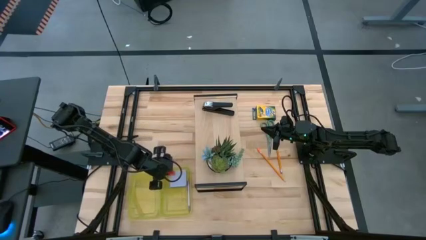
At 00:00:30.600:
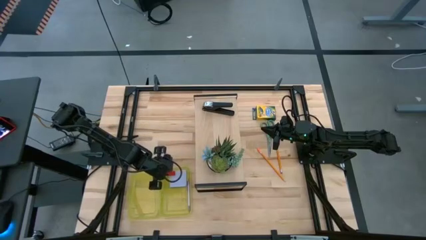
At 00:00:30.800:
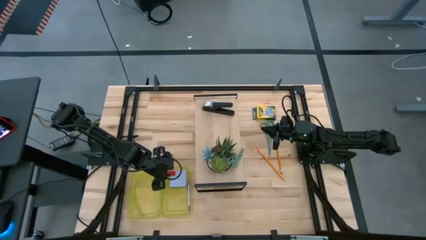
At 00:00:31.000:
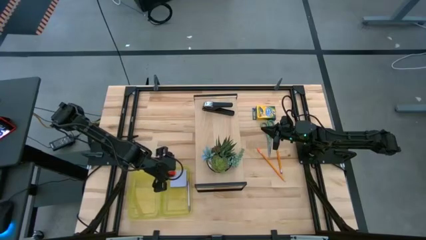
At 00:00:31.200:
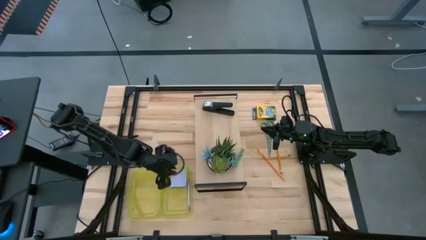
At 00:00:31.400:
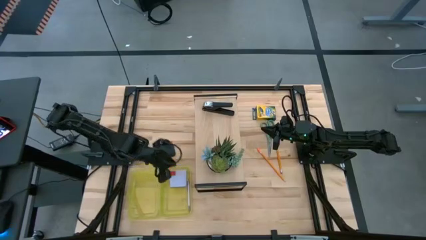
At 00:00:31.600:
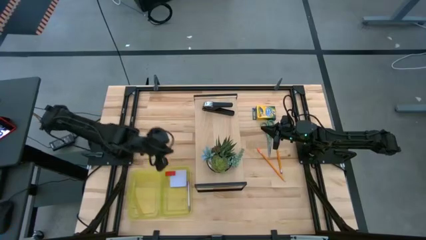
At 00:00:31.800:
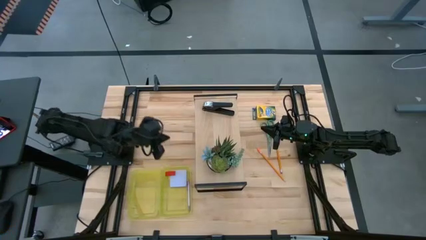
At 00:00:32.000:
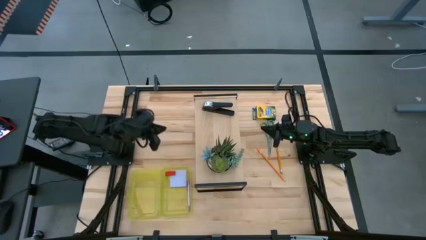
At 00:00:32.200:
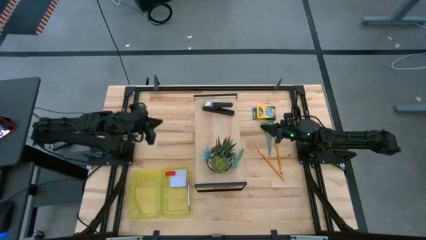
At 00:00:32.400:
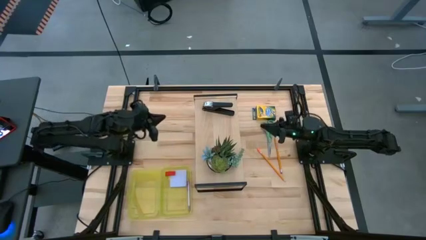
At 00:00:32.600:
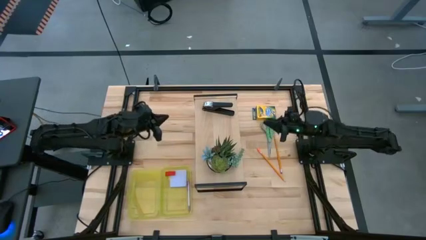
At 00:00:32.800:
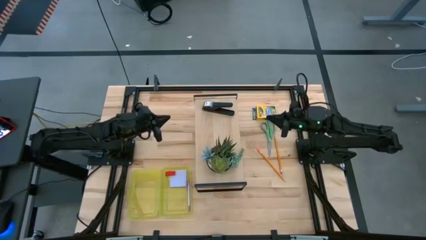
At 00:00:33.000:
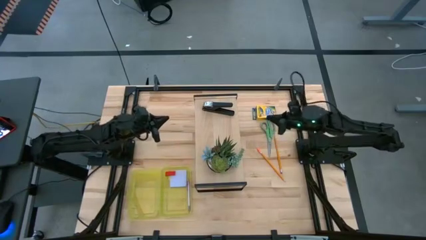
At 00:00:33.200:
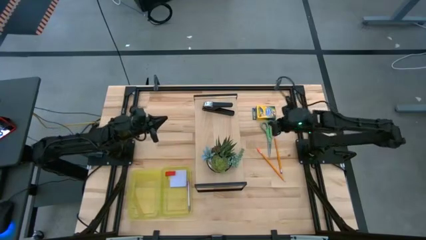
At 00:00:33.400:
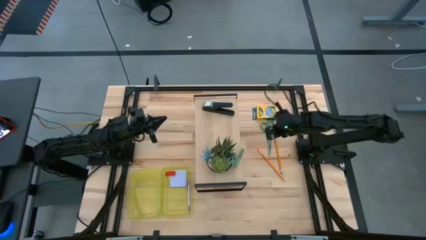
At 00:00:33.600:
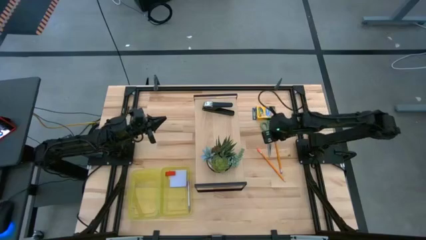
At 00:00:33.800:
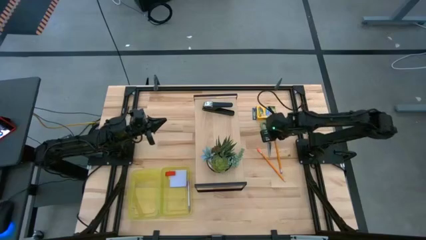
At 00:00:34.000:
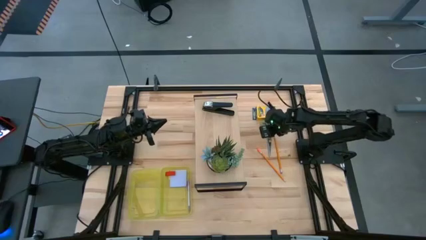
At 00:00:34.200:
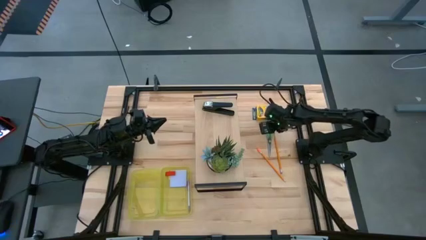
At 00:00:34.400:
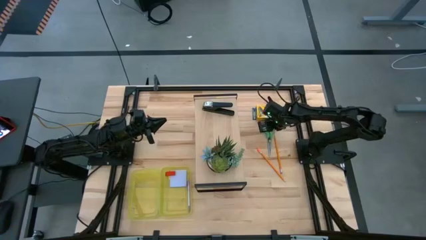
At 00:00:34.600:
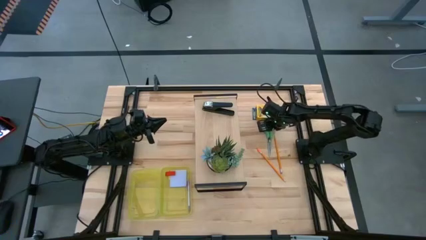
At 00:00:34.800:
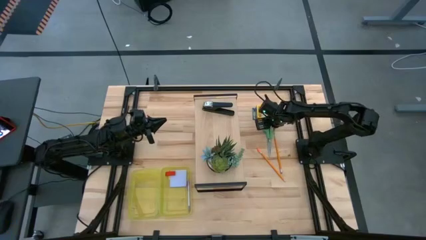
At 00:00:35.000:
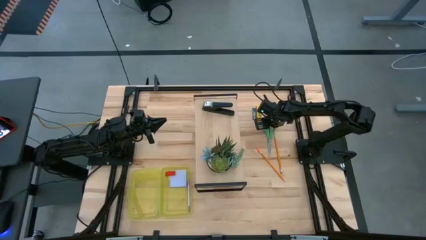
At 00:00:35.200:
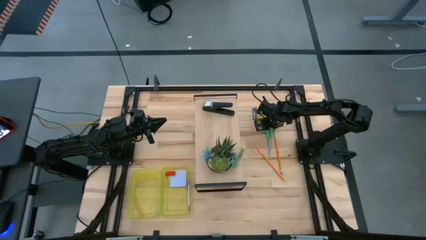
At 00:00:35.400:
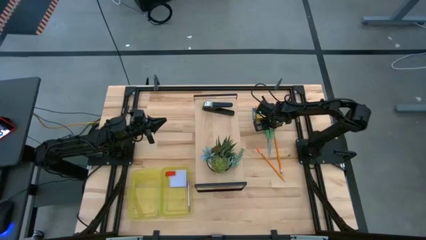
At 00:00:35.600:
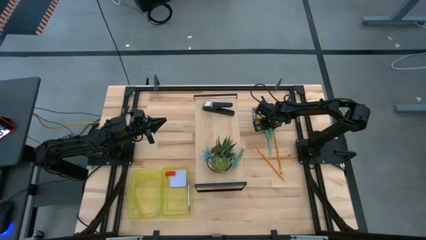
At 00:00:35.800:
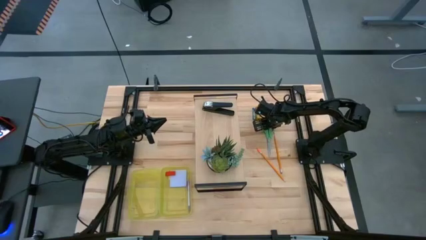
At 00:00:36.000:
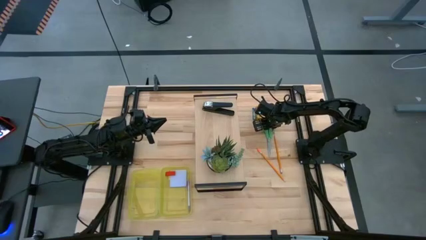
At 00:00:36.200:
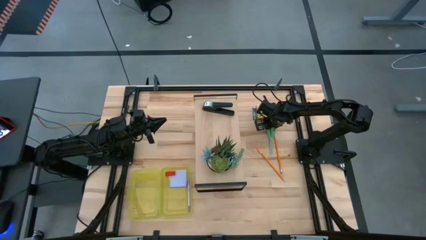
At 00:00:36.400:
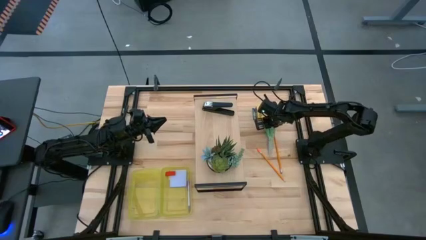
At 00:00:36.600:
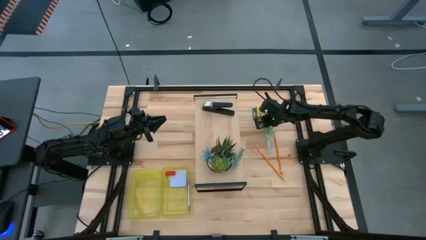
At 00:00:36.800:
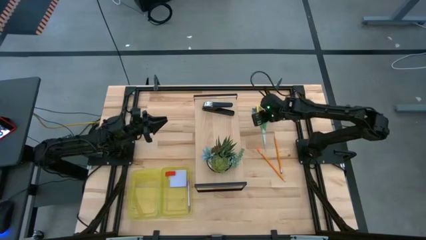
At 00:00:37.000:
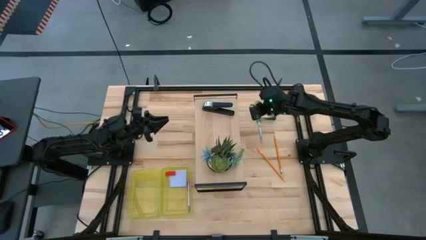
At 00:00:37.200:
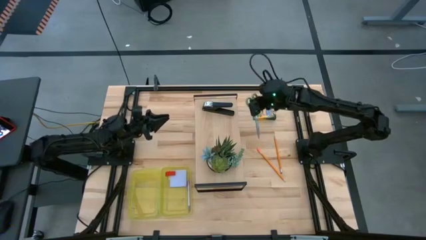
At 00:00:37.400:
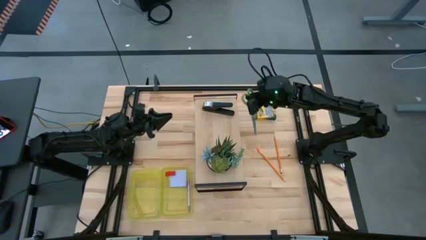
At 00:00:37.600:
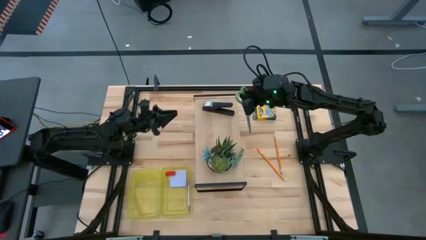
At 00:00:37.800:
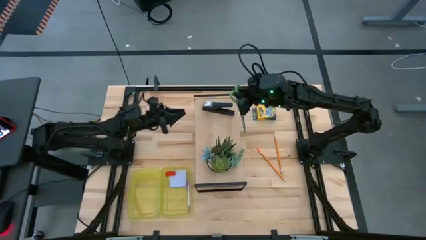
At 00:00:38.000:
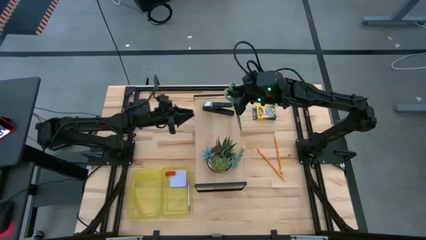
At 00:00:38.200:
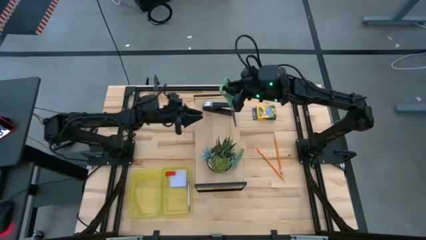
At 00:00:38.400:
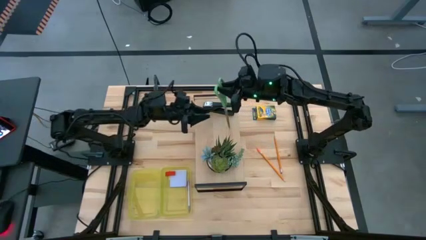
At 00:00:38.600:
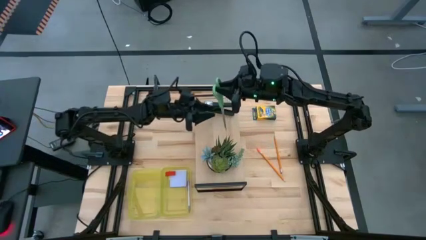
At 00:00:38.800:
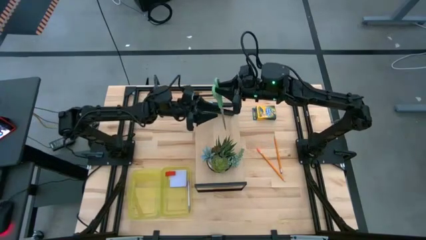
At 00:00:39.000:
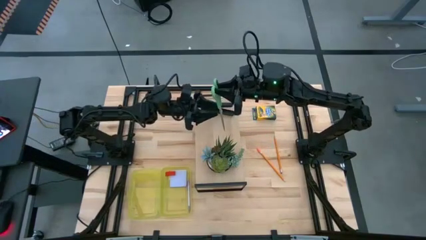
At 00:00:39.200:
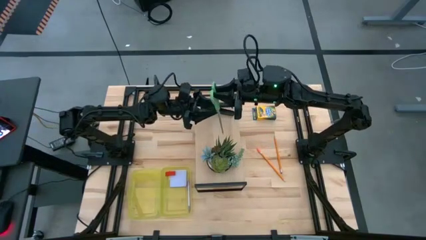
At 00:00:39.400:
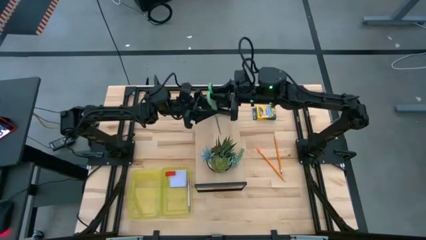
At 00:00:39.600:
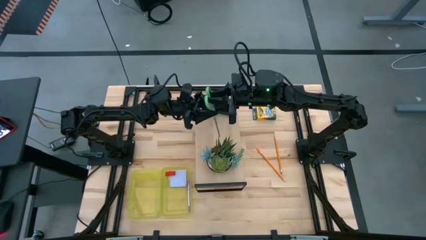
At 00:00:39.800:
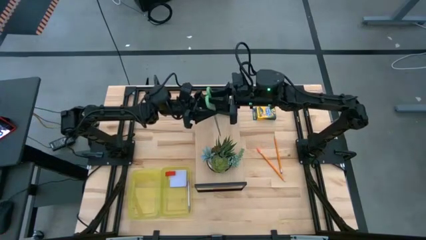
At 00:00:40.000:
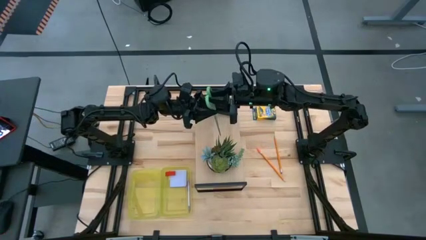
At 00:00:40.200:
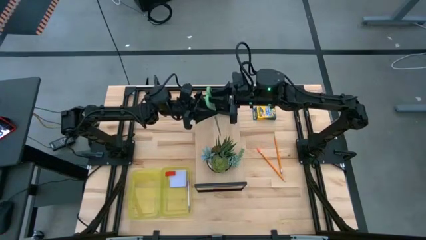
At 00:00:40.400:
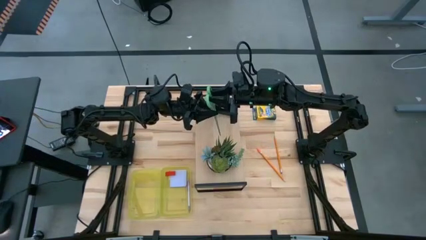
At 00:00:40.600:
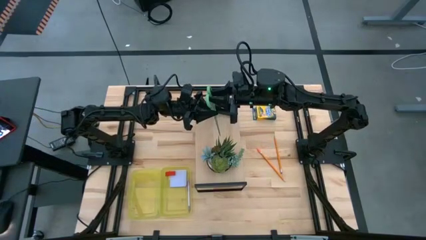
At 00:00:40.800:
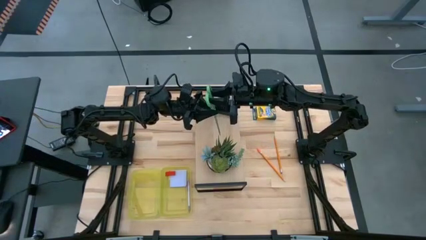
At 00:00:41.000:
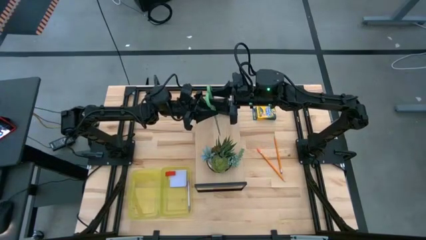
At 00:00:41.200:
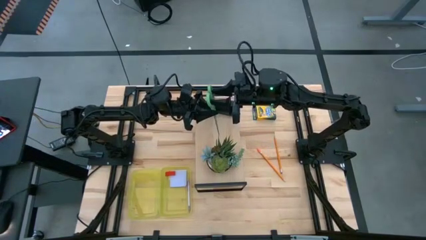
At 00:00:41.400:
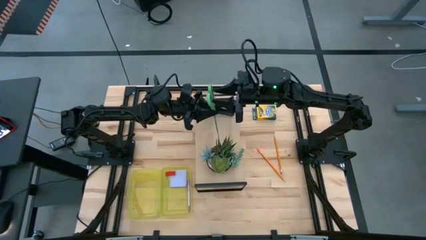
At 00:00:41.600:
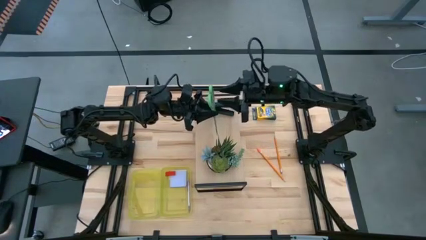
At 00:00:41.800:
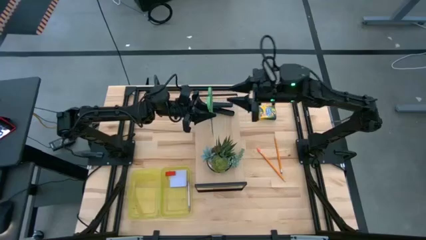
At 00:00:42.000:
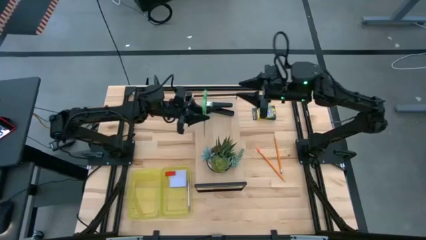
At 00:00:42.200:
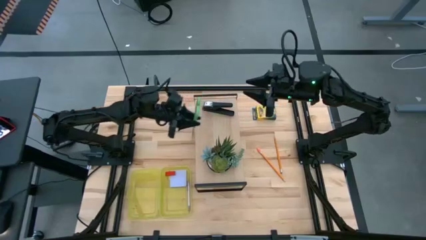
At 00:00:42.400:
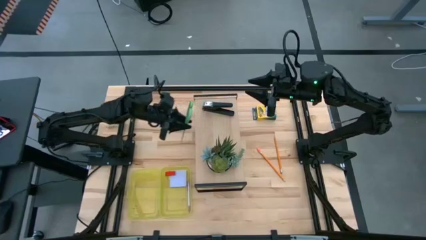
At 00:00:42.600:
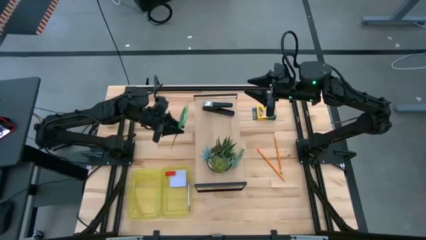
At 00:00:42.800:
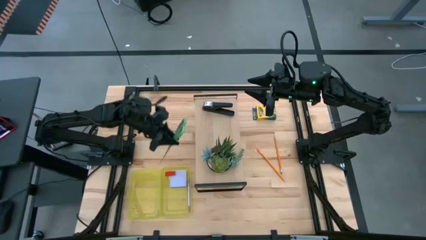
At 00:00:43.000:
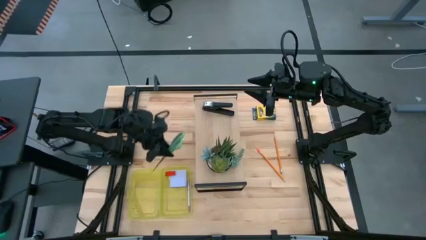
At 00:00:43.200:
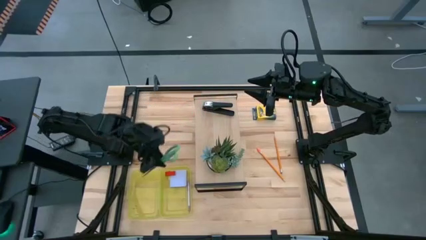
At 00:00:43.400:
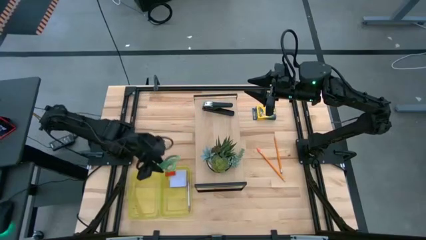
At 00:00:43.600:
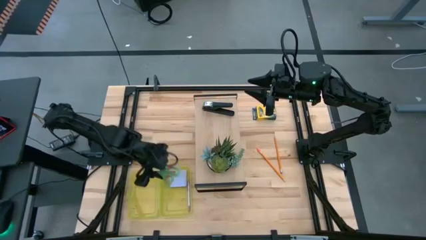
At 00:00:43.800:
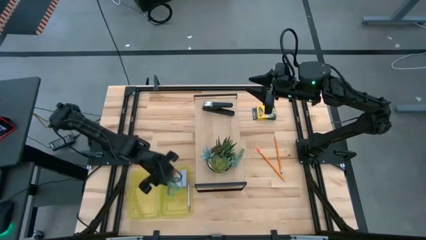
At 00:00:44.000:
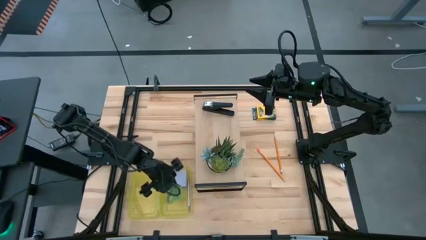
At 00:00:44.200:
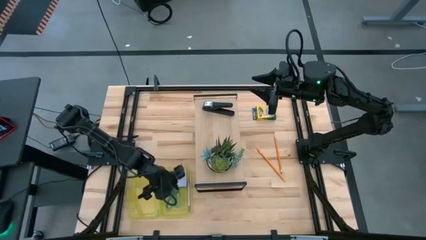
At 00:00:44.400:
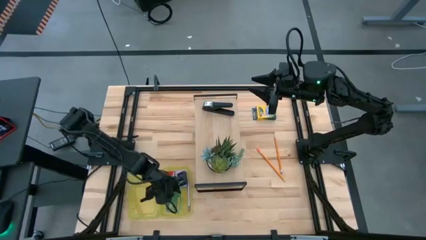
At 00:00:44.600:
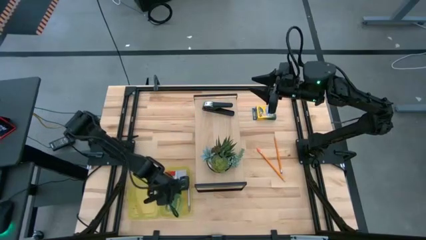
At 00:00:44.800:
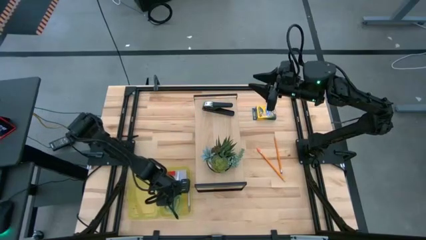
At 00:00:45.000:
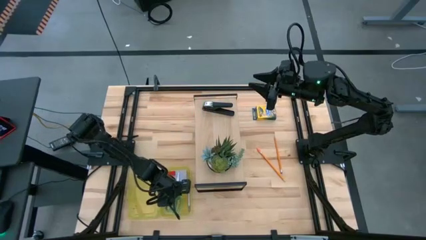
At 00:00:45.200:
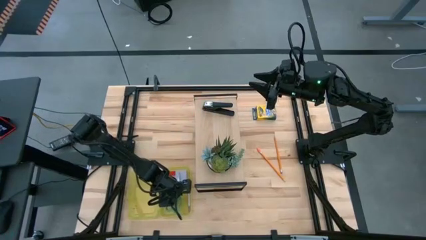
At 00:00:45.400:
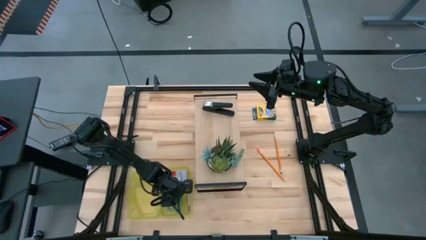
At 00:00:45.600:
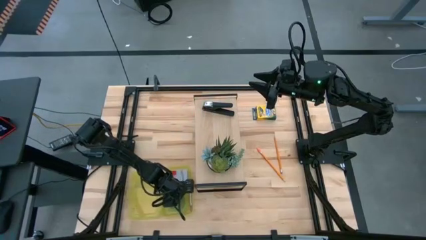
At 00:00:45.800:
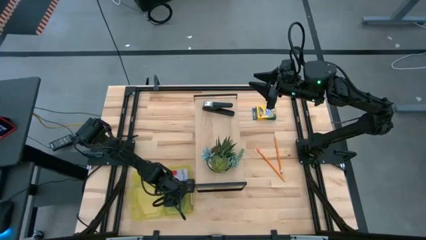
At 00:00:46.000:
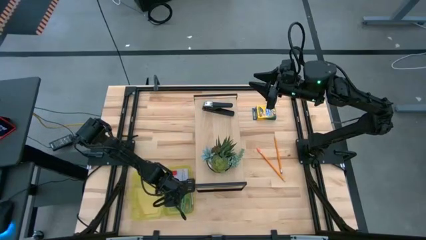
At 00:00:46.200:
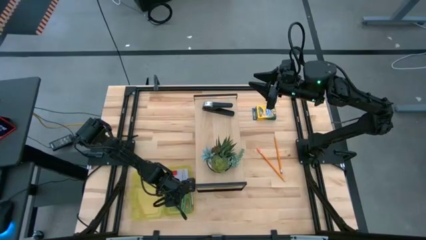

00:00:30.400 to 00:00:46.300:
Task: Pack school essentials
Put the green scissors into the yellow supply box
